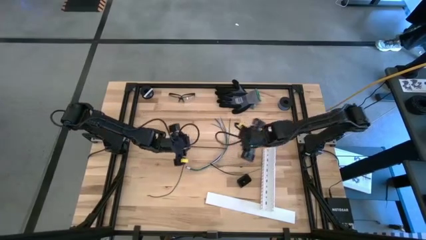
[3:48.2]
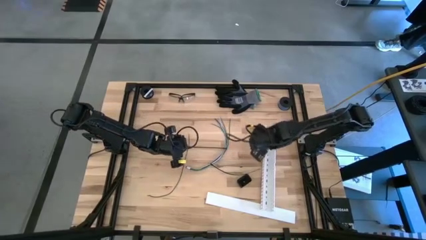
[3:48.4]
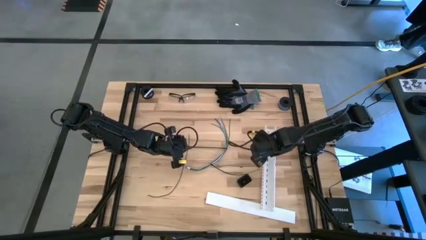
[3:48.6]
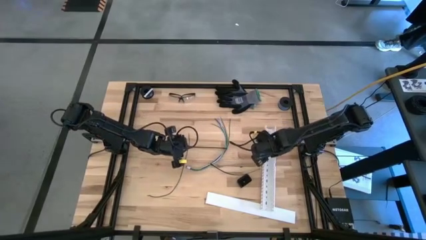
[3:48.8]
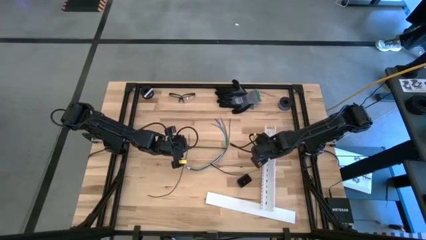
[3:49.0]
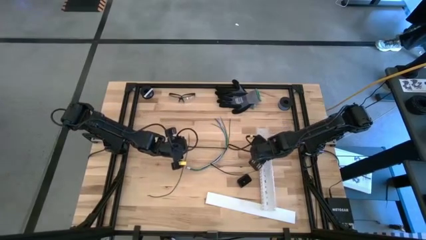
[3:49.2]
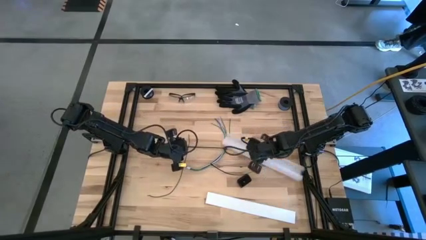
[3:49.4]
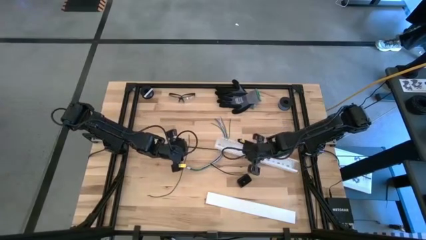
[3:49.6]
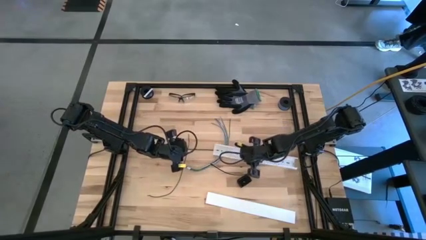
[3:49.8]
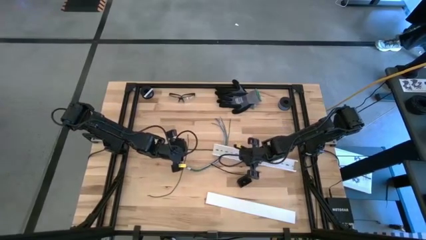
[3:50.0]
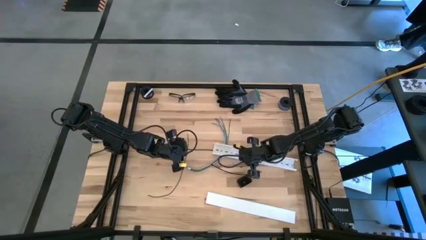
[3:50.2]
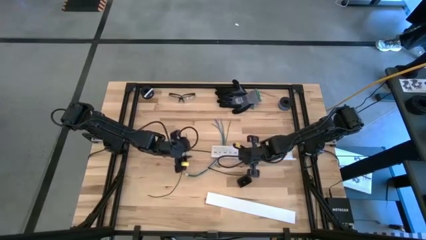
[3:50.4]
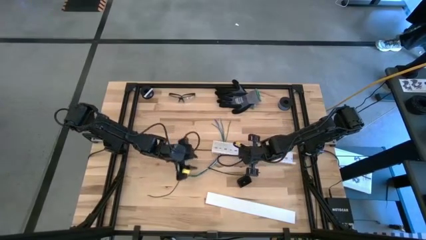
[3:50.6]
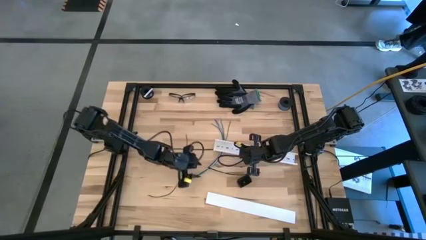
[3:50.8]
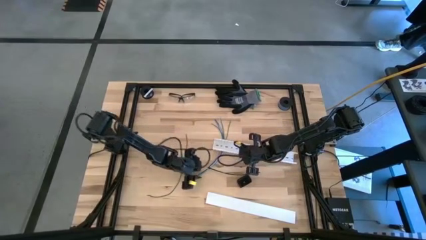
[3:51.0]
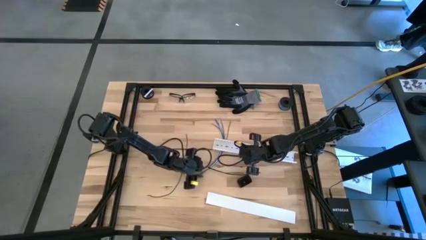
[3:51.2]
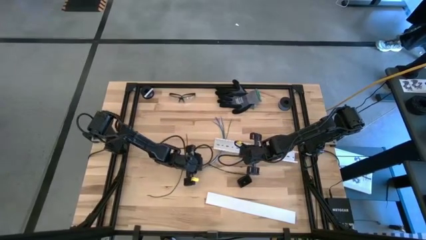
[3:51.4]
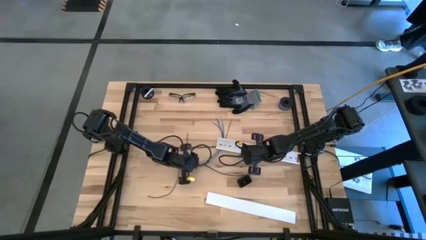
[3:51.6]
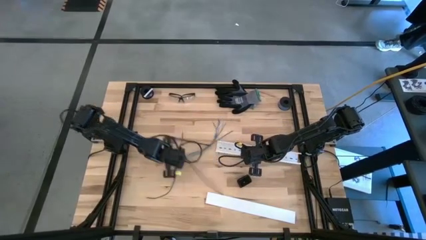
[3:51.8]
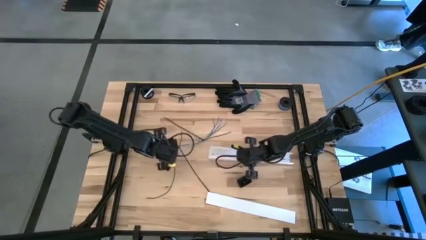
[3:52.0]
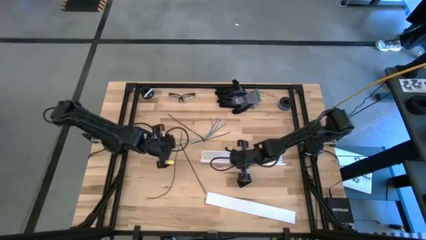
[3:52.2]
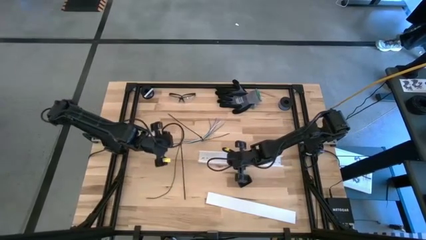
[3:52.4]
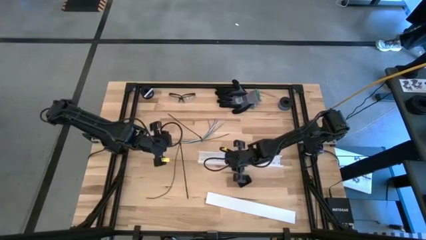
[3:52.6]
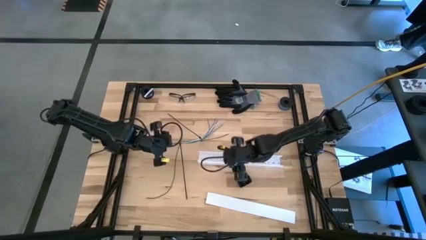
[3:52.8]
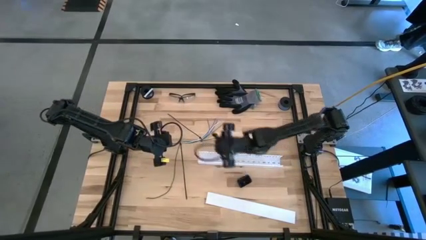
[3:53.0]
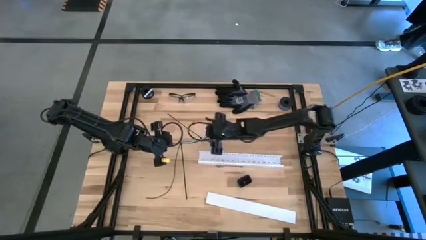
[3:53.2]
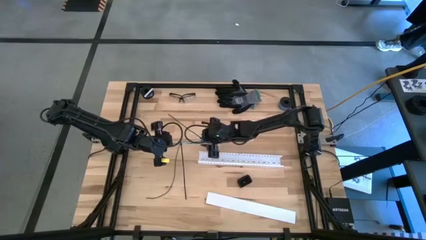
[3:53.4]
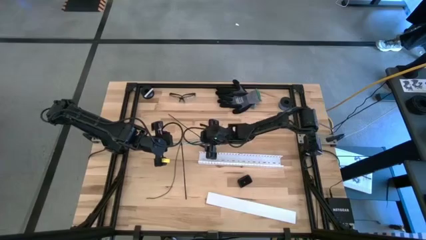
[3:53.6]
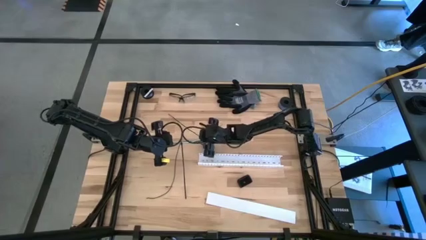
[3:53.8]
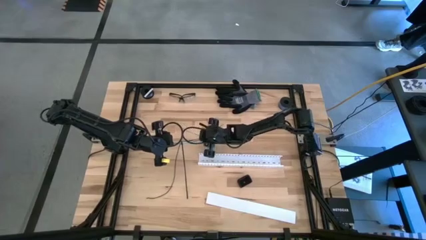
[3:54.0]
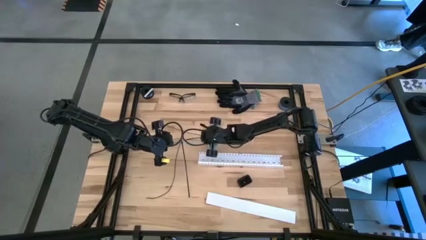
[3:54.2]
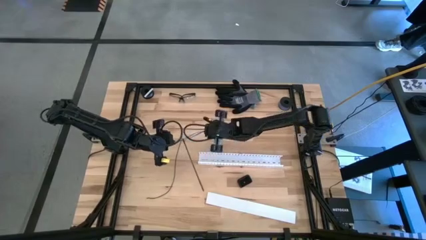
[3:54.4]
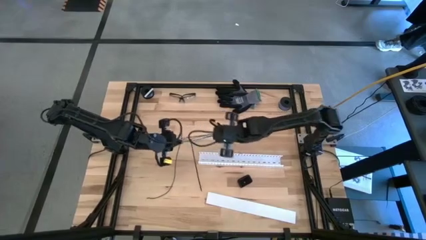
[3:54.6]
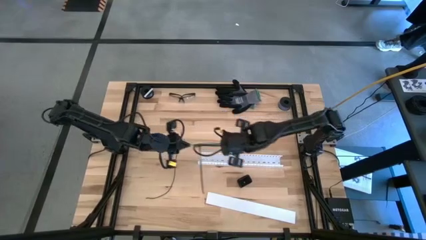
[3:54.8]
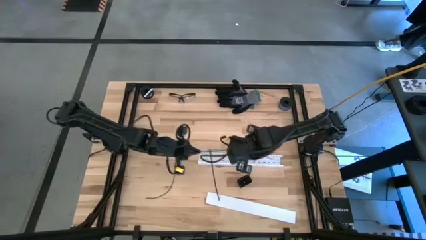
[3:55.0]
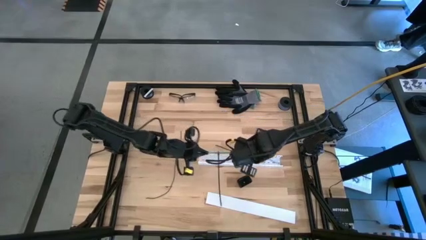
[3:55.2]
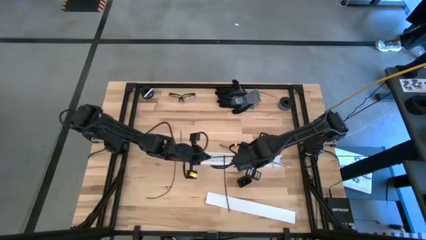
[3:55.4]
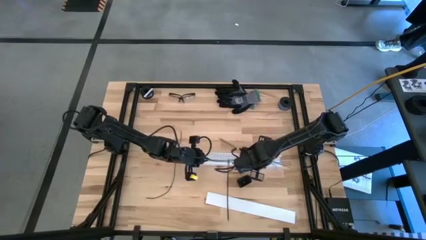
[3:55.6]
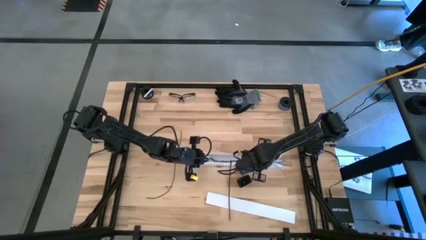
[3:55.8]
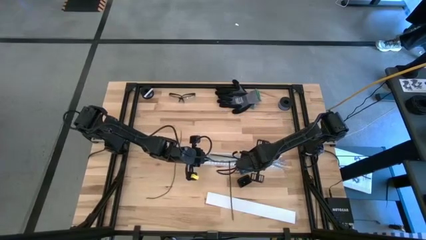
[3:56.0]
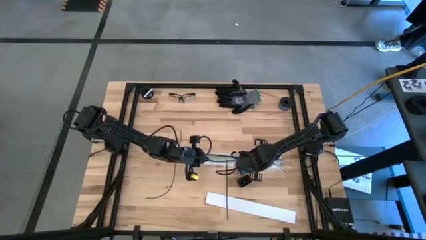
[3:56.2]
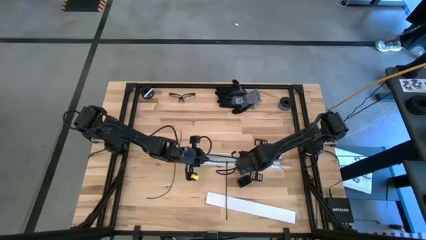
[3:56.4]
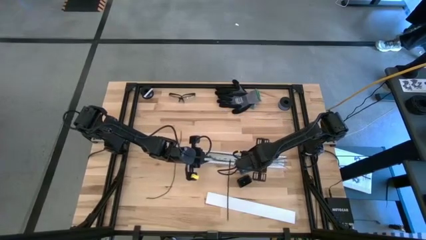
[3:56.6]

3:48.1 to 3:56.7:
Task: Ziptie cables
Put the ziptied cable wires into the white cable duct

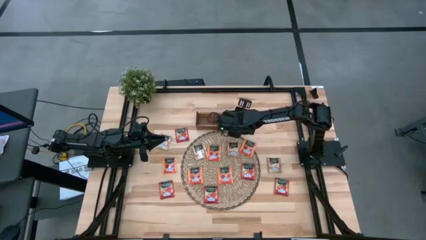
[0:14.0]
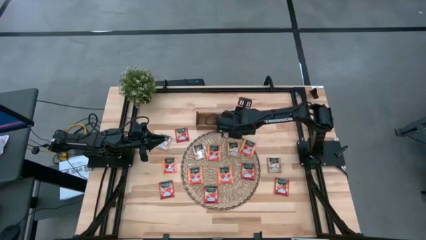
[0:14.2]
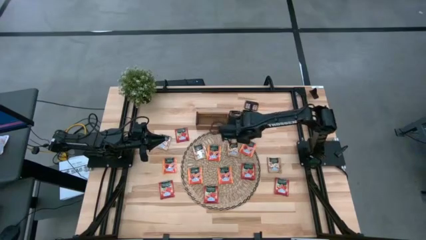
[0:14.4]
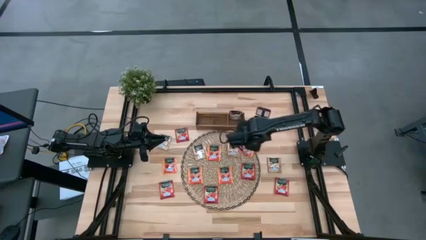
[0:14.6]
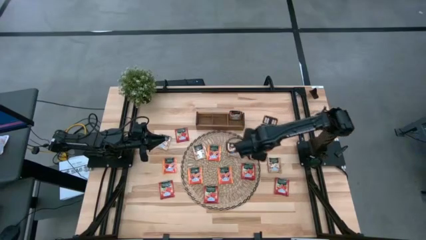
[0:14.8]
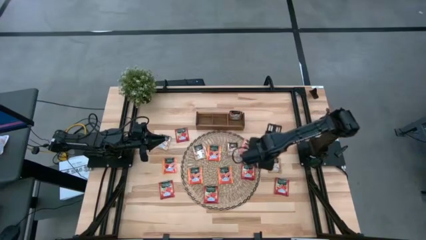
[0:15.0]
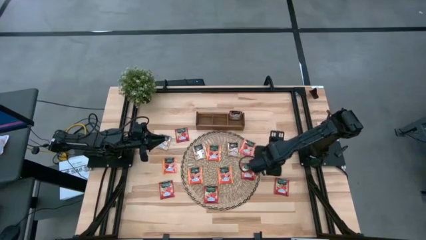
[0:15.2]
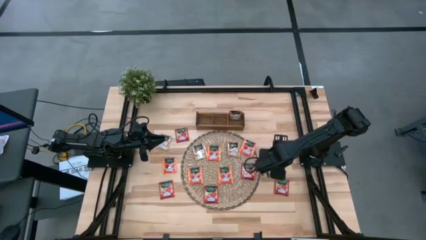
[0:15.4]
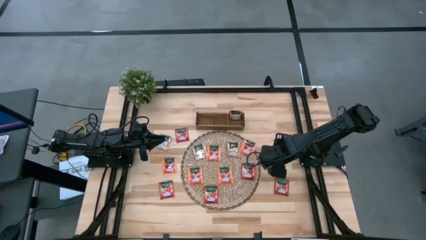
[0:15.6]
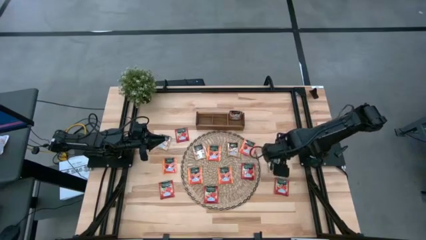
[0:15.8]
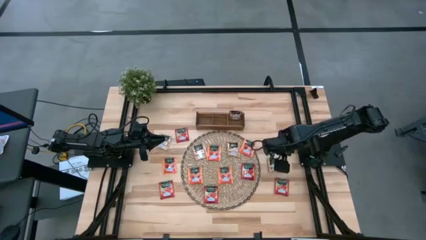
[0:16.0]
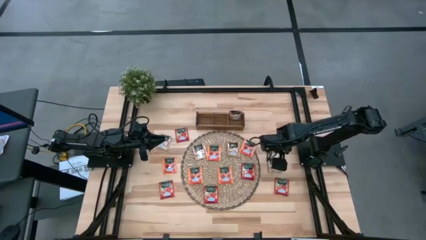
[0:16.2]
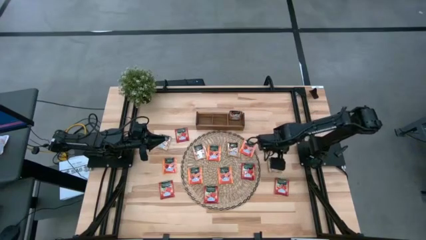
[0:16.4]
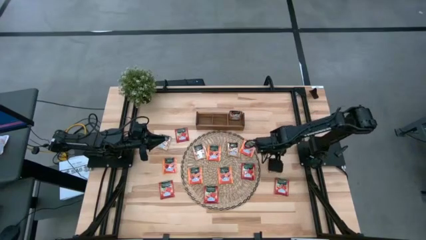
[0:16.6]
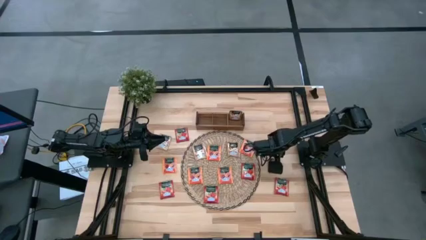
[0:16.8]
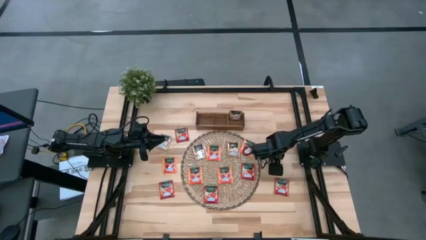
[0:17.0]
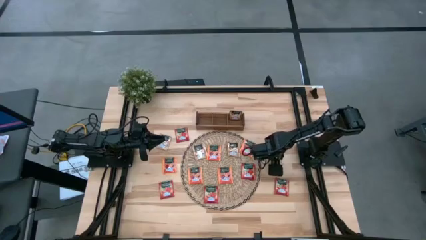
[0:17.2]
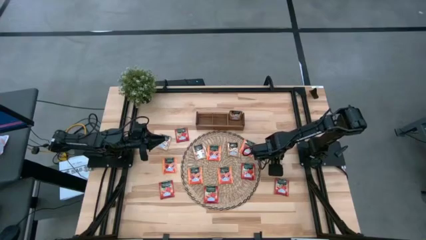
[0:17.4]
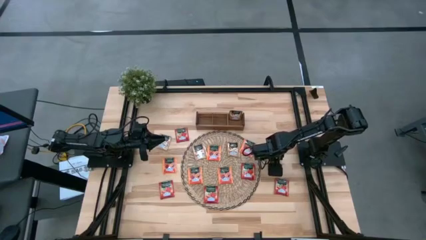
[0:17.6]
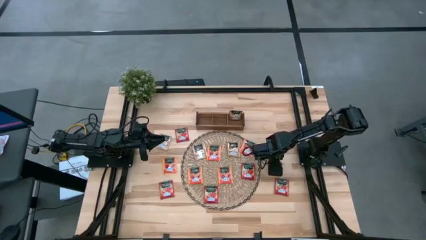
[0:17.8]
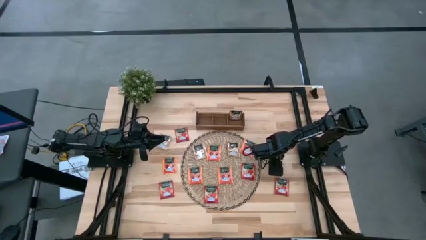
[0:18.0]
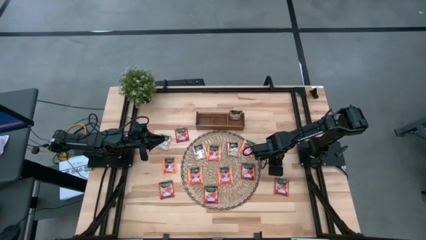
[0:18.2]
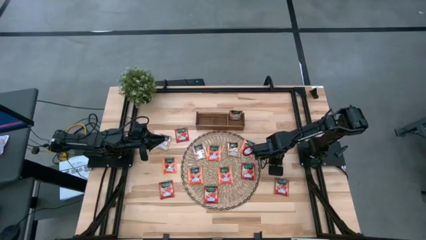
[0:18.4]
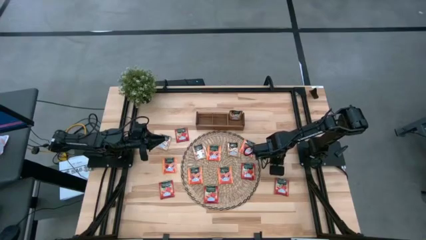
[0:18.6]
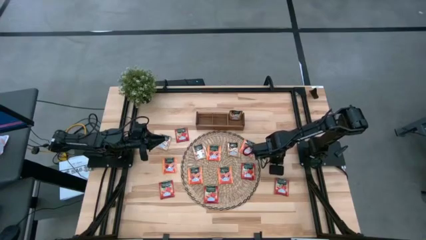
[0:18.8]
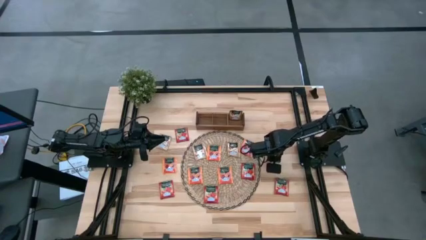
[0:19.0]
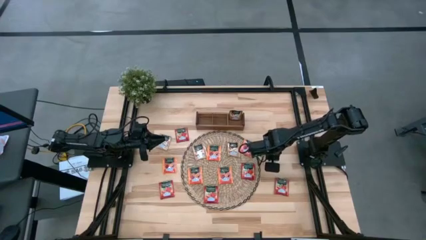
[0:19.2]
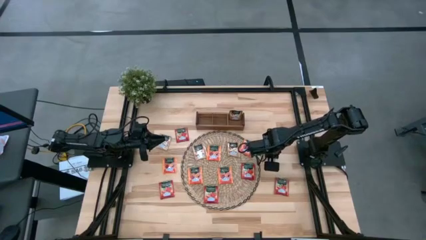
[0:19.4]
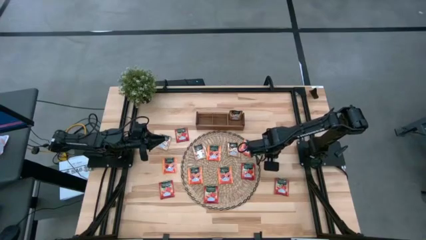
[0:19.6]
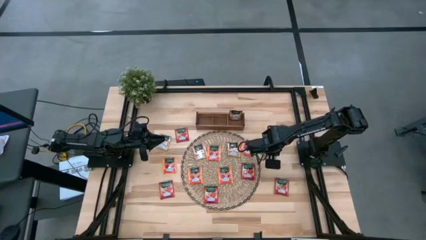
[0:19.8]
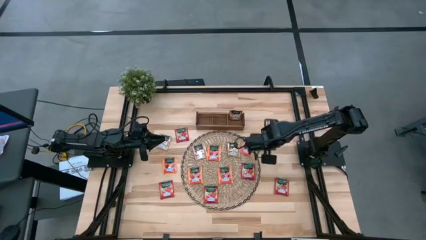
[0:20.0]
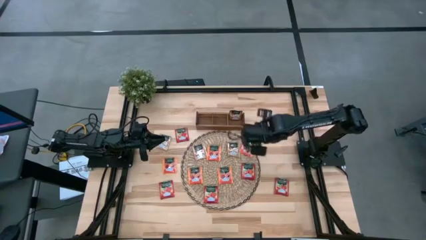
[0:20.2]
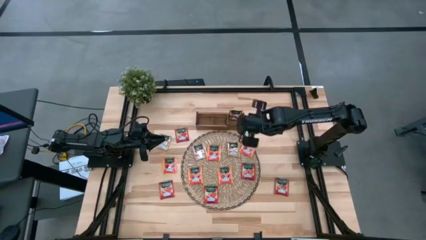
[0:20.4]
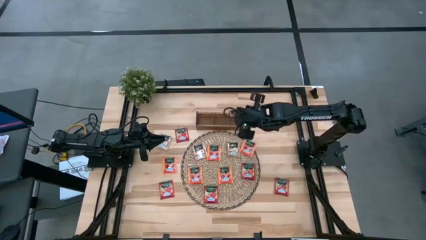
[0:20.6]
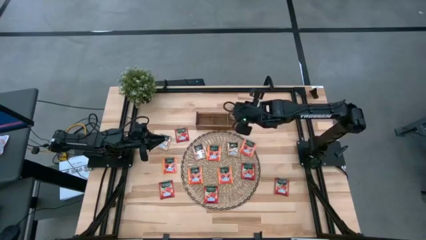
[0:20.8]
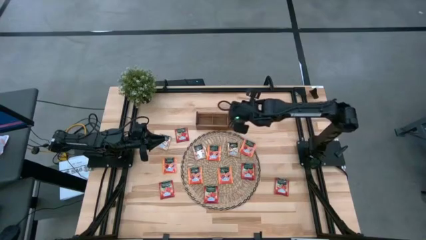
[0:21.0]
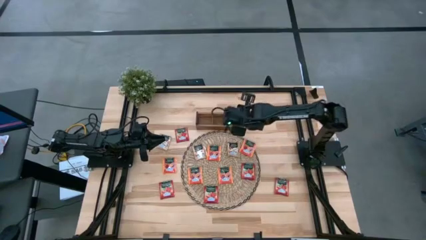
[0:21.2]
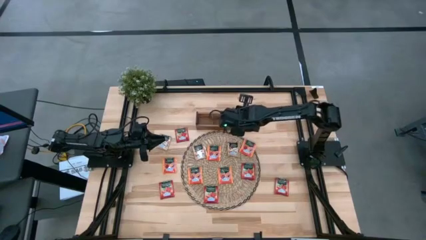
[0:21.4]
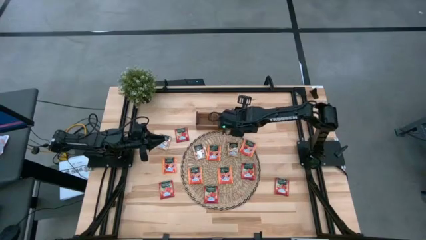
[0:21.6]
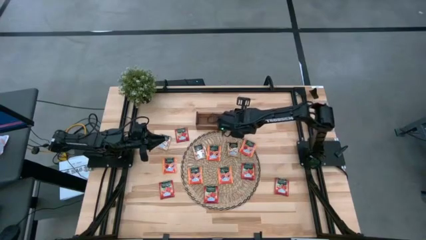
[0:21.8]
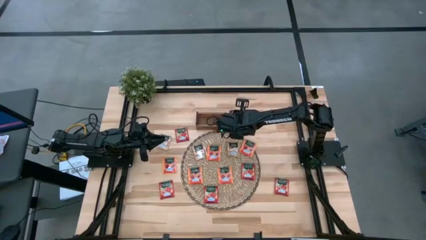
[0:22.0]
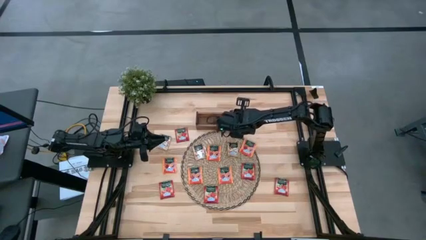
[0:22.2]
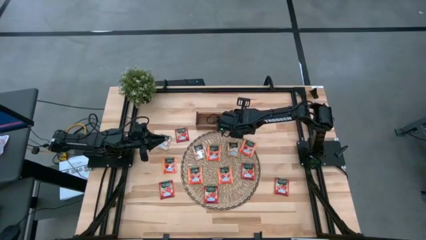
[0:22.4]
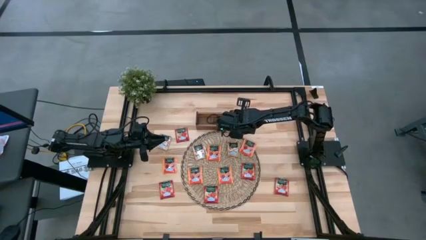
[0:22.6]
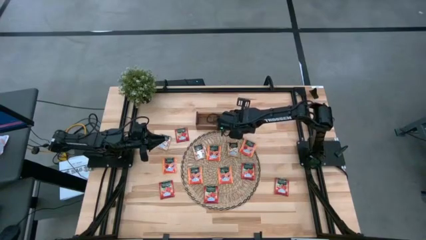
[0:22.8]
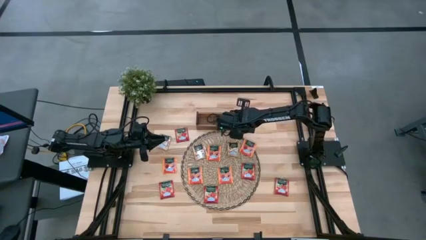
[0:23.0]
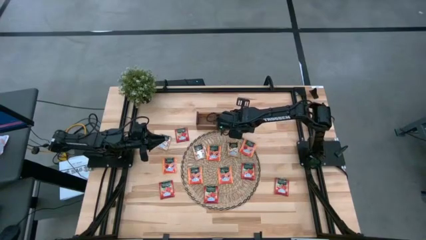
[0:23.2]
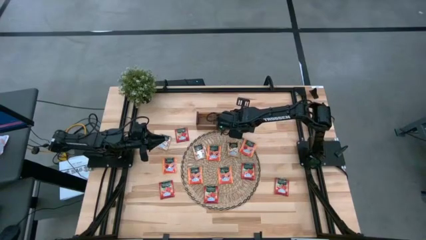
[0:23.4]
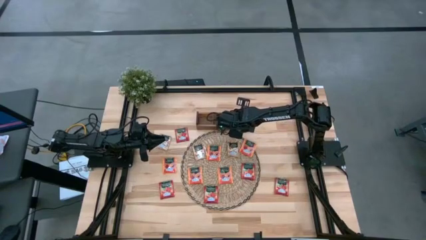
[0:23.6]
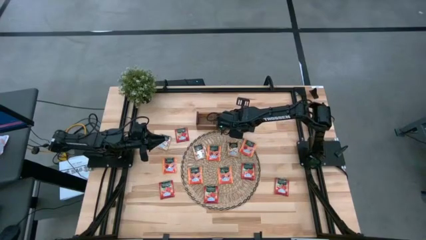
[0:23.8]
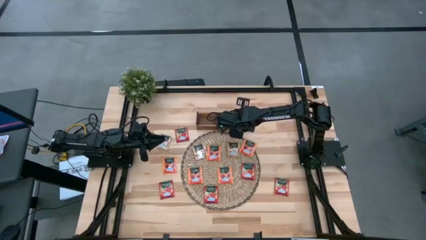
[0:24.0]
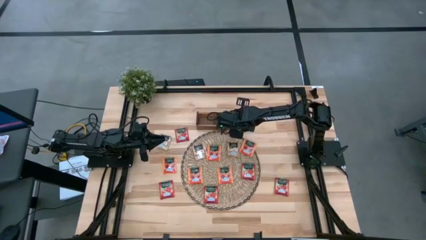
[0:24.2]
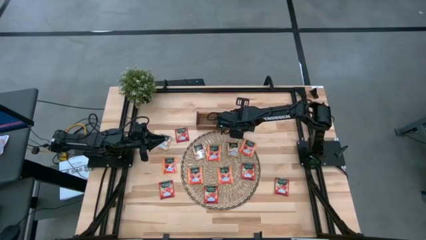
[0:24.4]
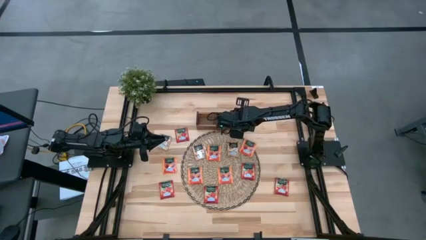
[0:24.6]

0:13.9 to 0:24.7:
Task: Pick & Place Tea
Put the brown tea bag into the right section of the wooden organizer
